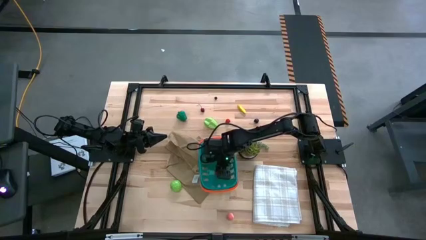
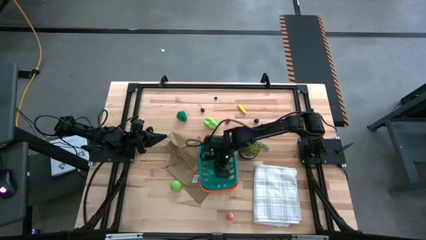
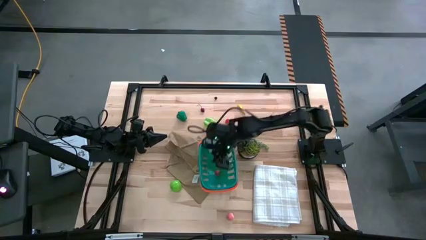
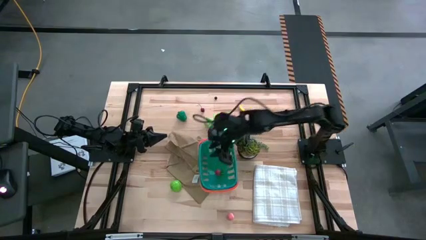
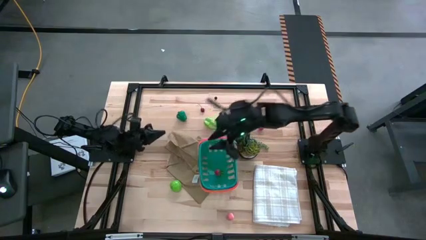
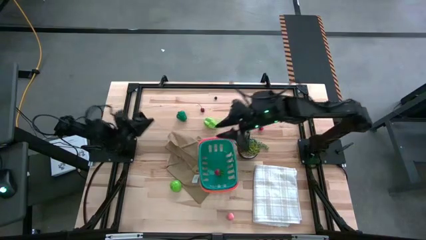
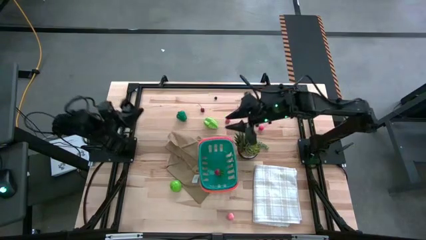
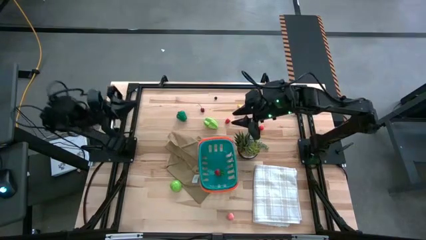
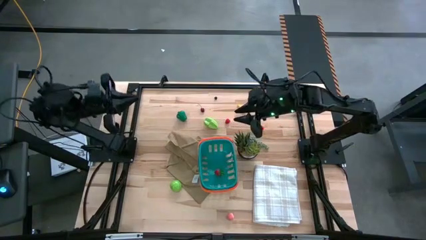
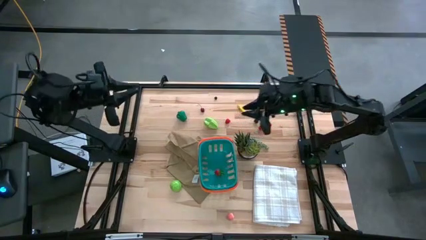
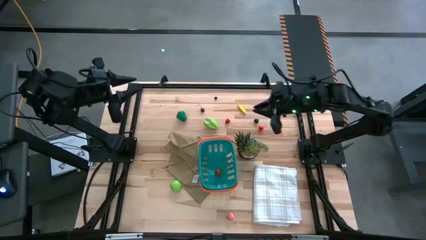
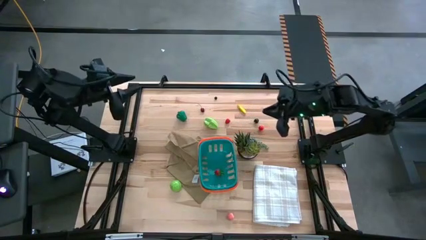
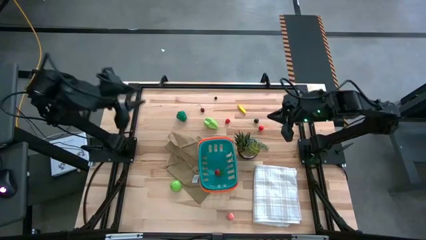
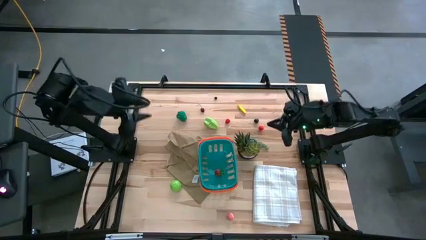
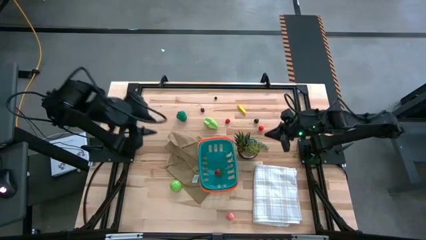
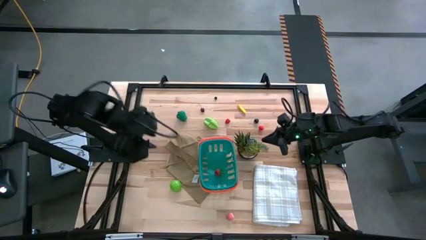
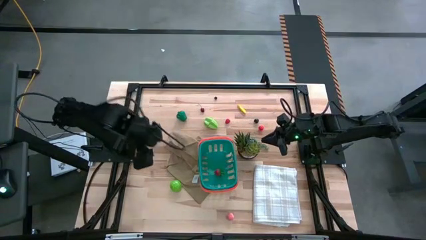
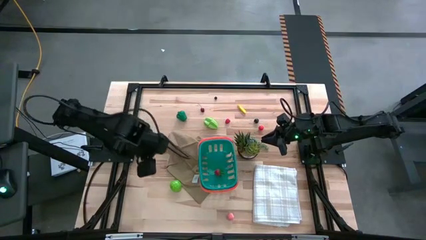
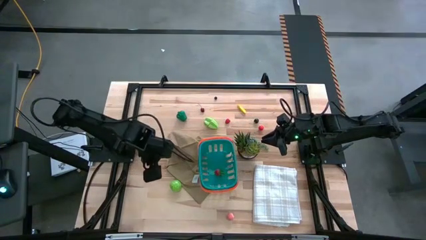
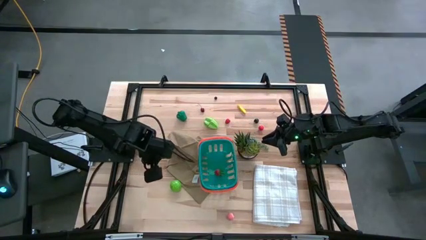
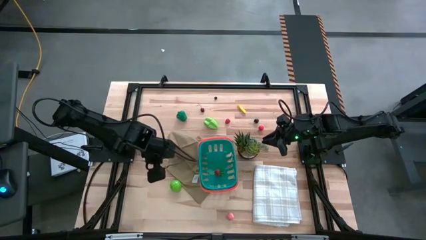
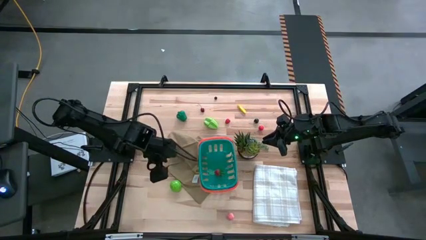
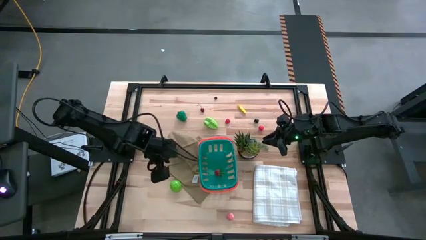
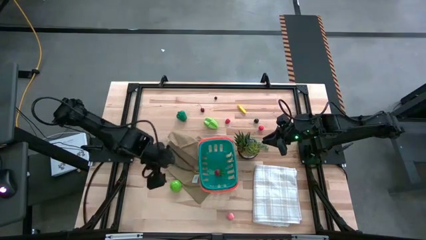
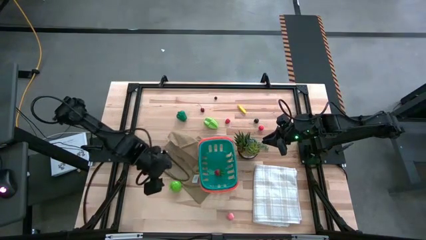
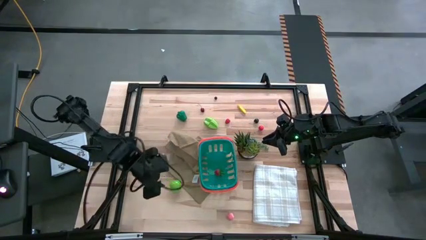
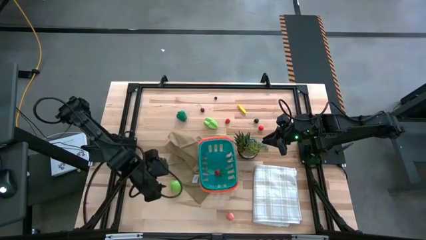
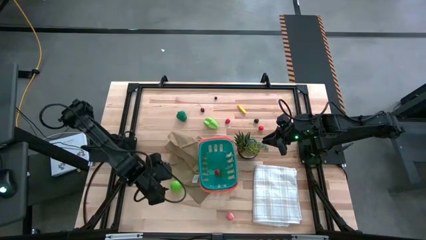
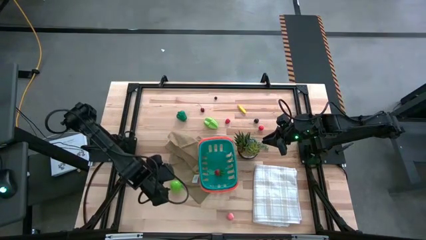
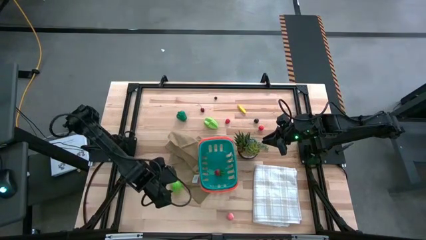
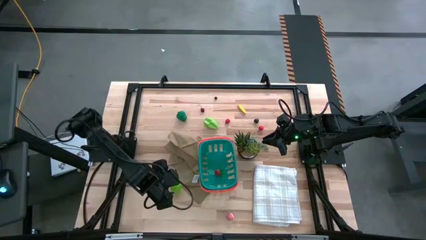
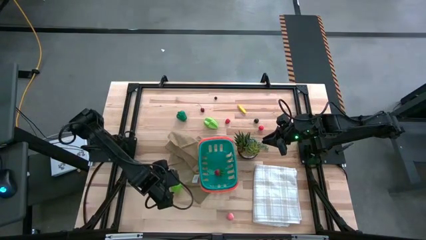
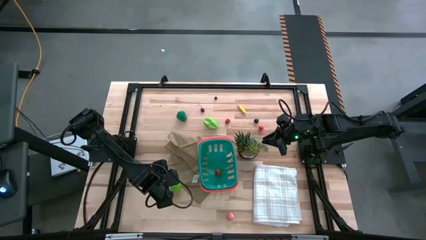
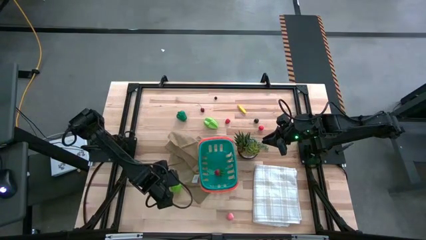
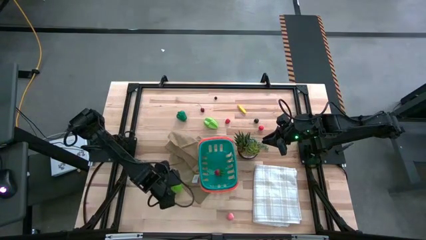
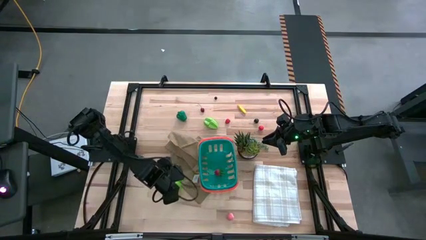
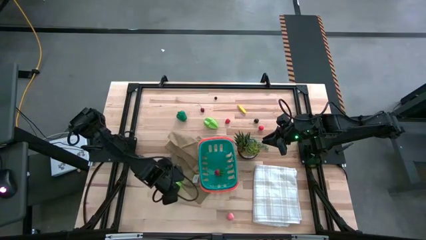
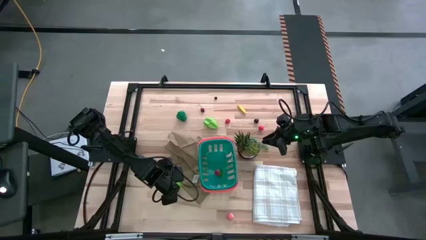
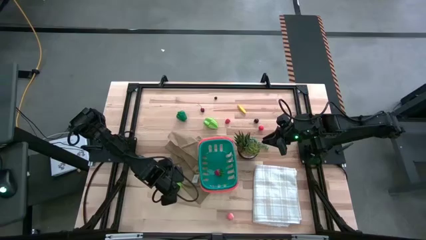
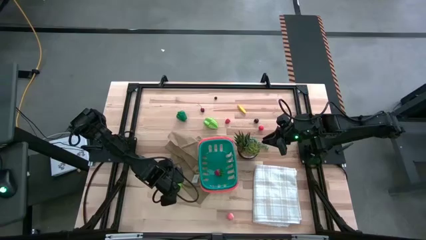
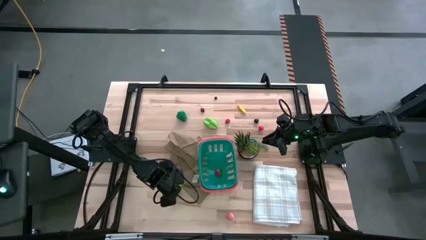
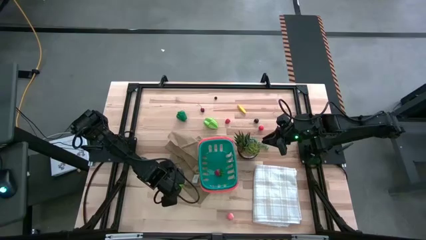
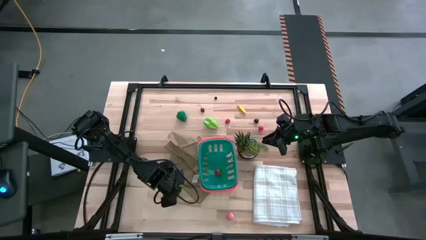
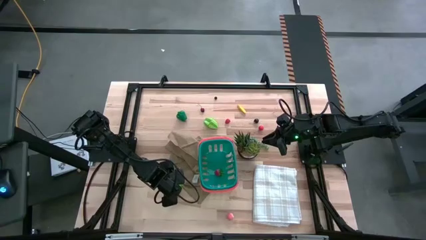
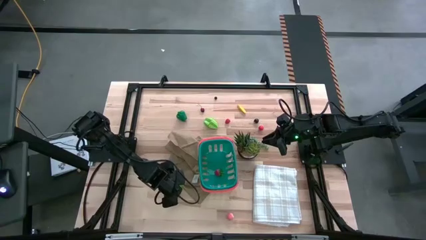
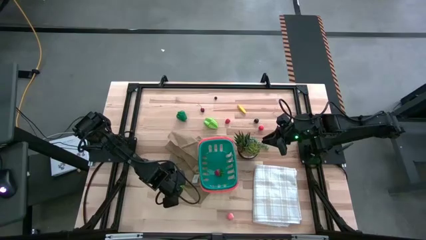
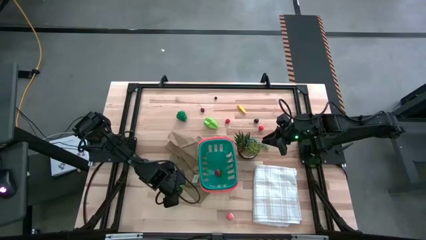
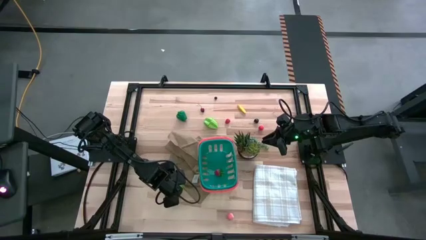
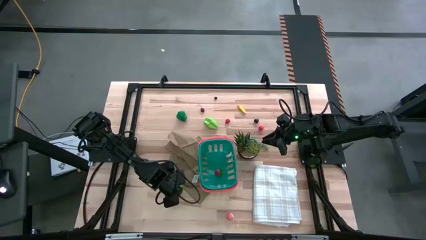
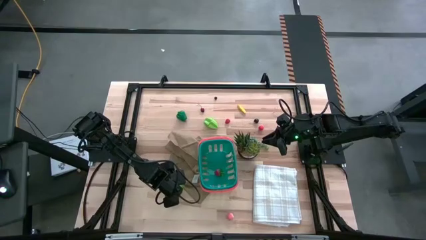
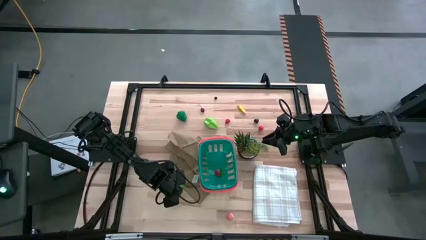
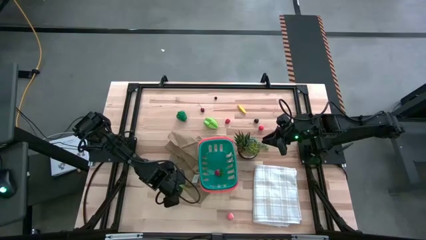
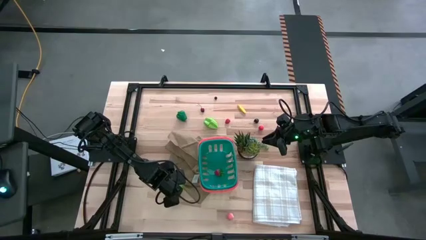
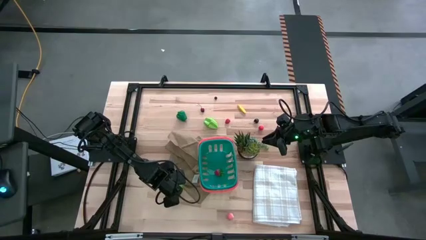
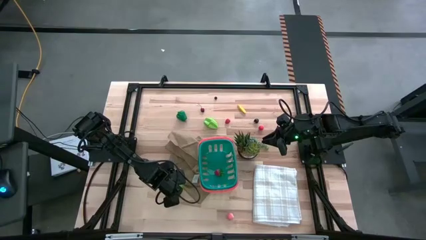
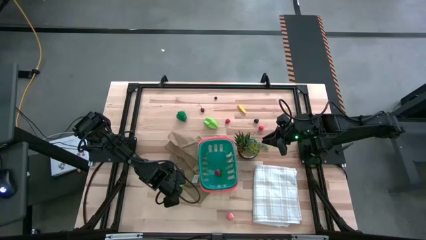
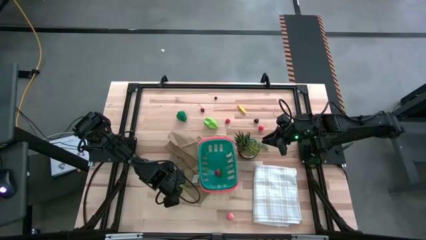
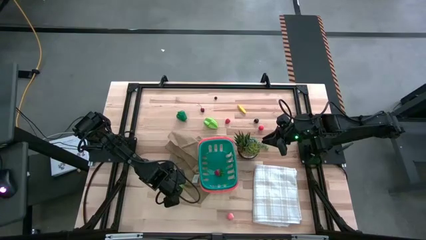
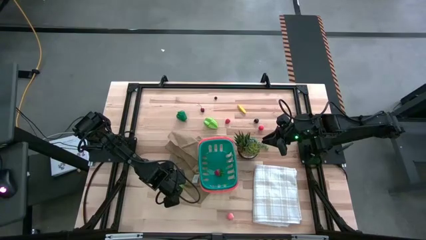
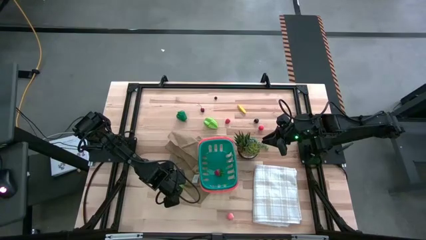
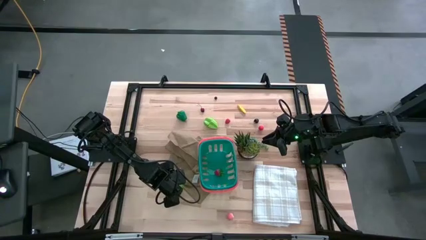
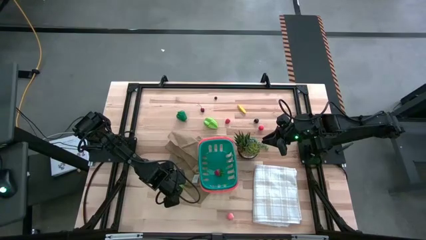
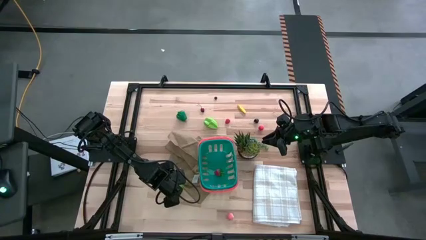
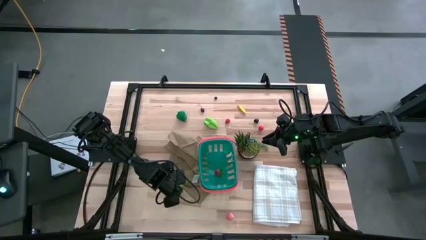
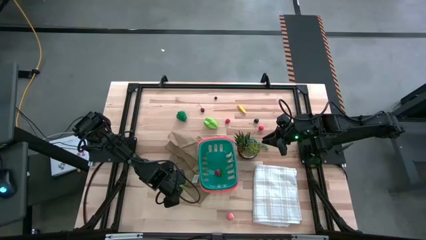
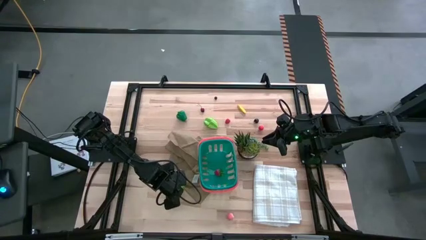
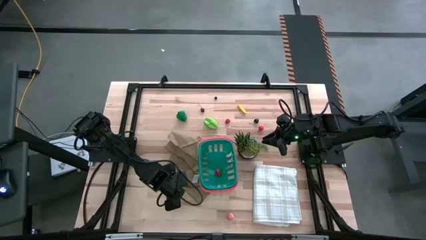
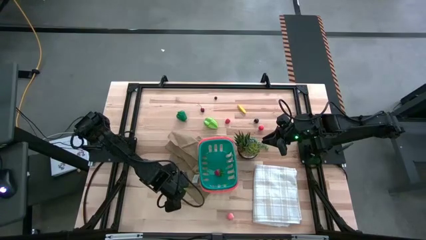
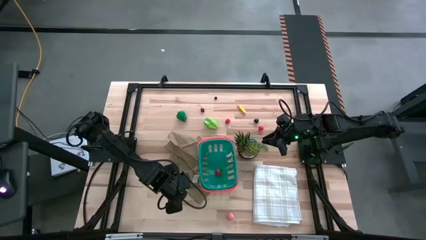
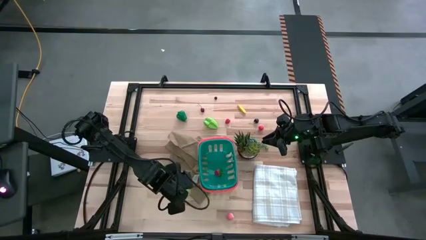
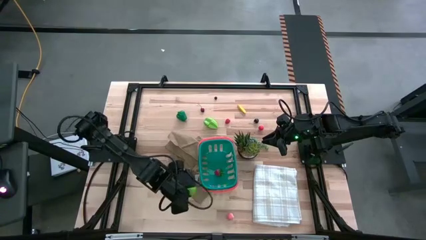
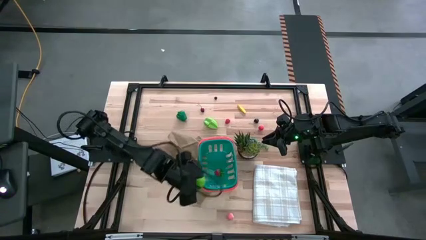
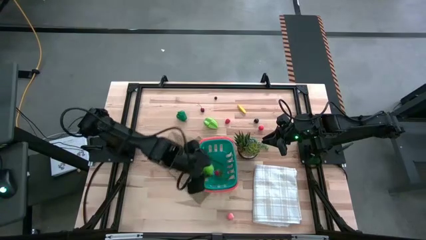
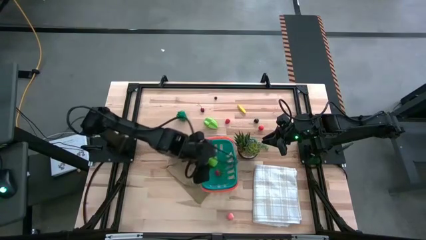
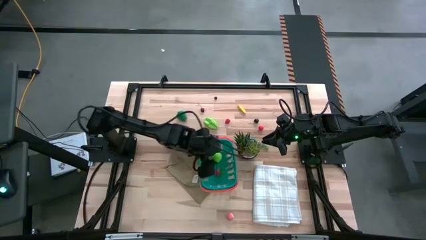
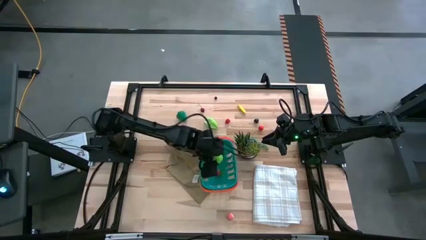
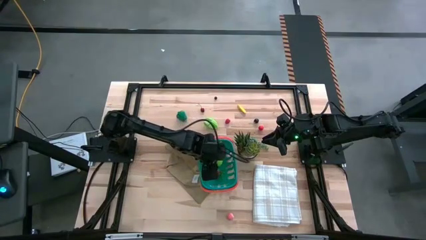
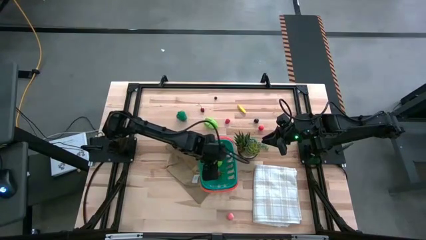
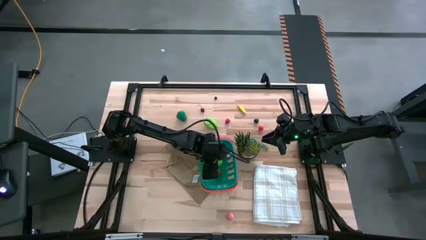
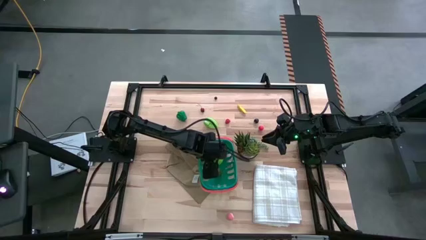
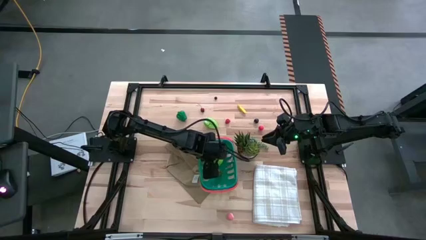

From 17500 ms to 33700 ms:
Task: Pick and placing Produce into tupperware
Put the green cabbage into the green basket
